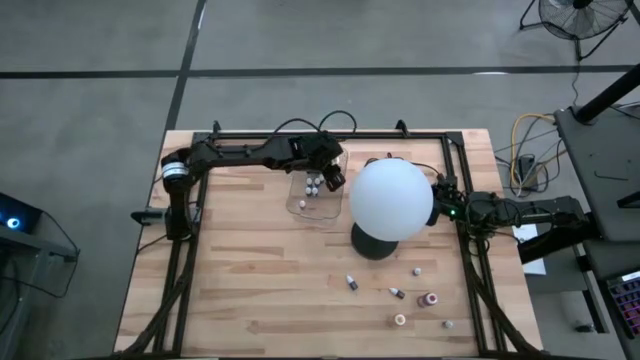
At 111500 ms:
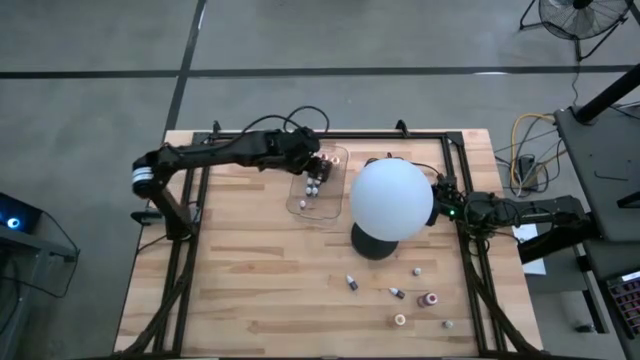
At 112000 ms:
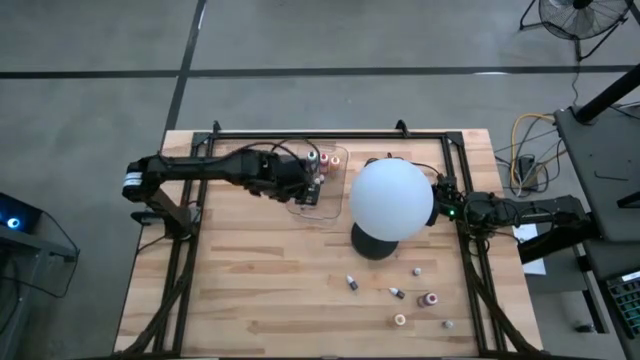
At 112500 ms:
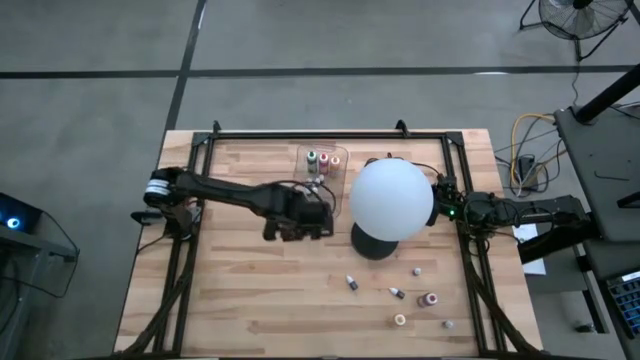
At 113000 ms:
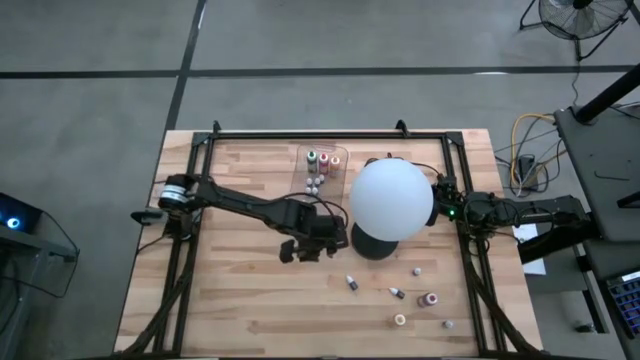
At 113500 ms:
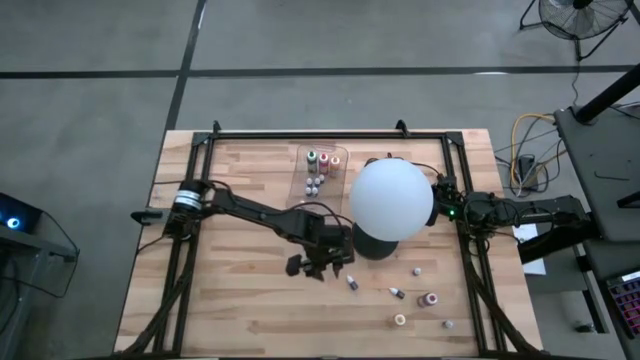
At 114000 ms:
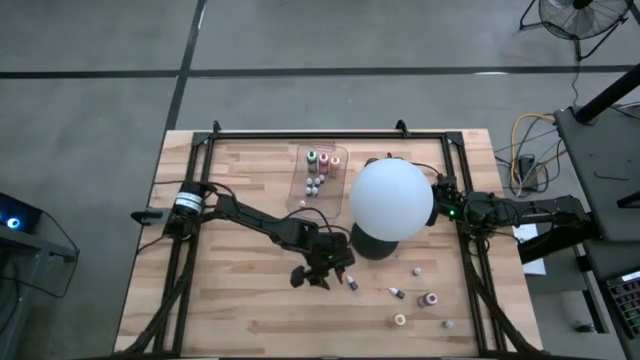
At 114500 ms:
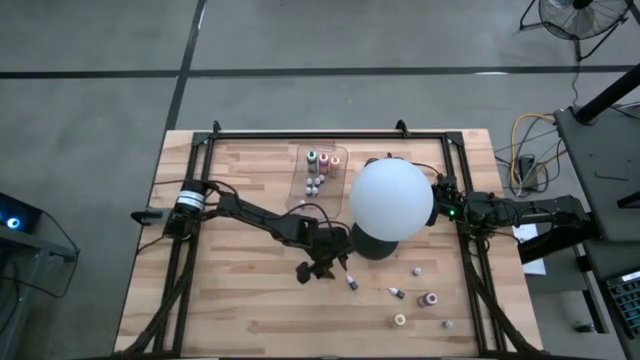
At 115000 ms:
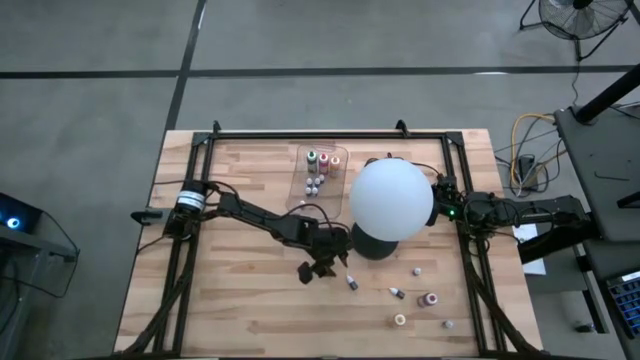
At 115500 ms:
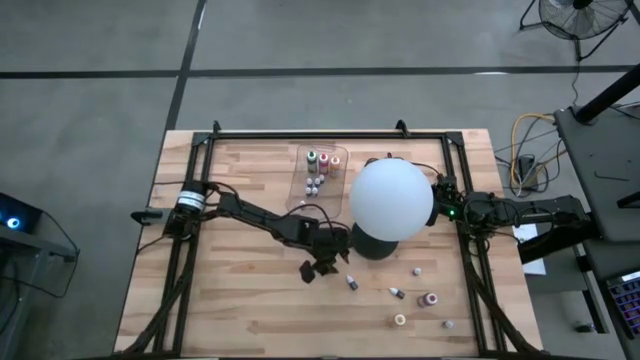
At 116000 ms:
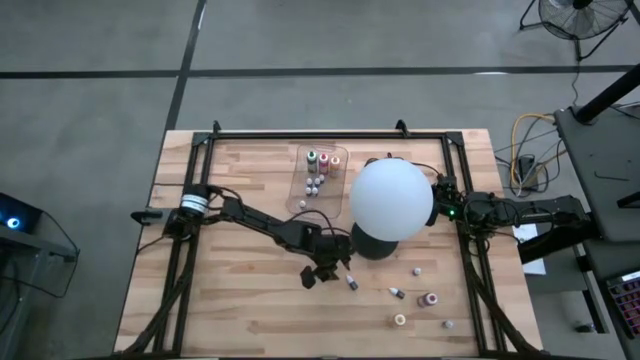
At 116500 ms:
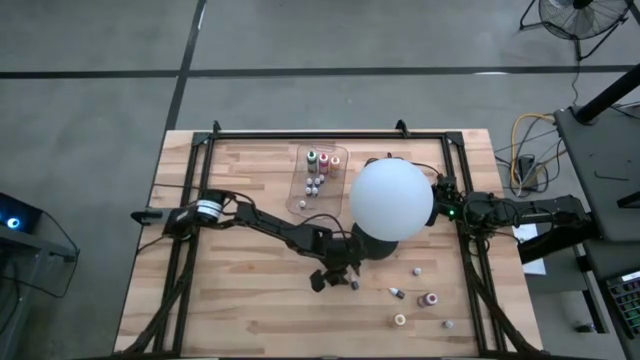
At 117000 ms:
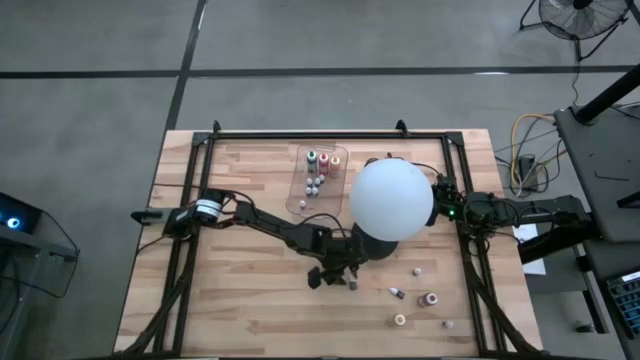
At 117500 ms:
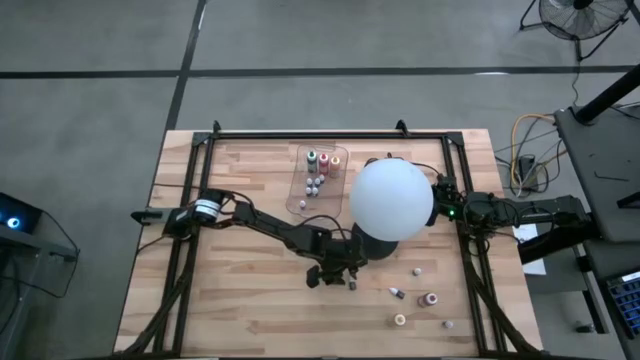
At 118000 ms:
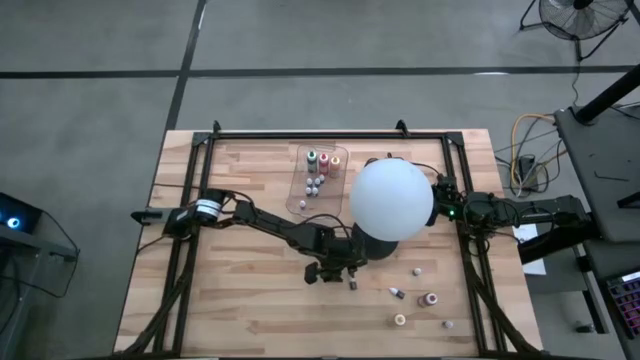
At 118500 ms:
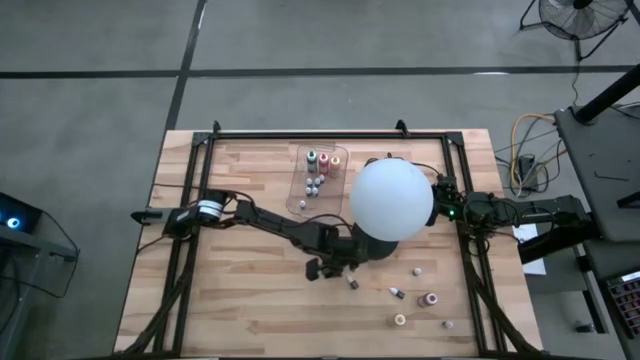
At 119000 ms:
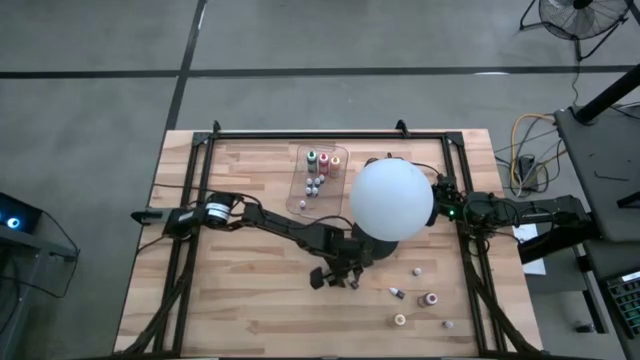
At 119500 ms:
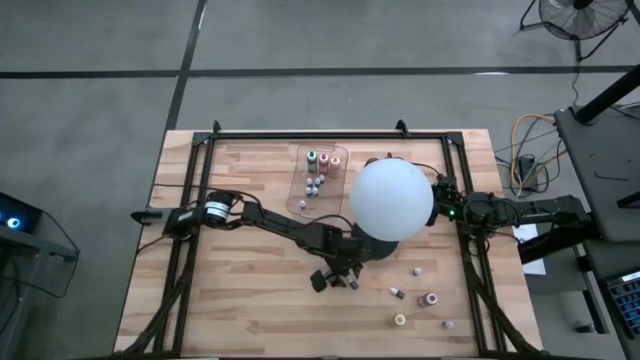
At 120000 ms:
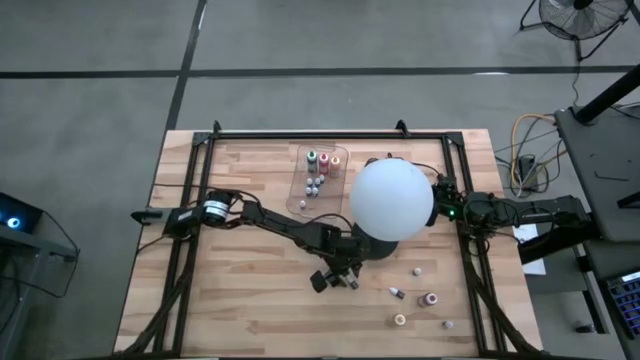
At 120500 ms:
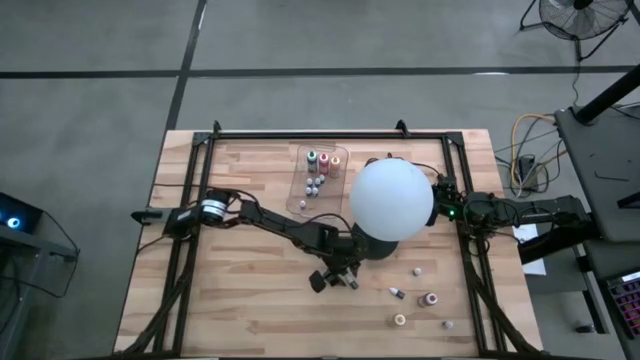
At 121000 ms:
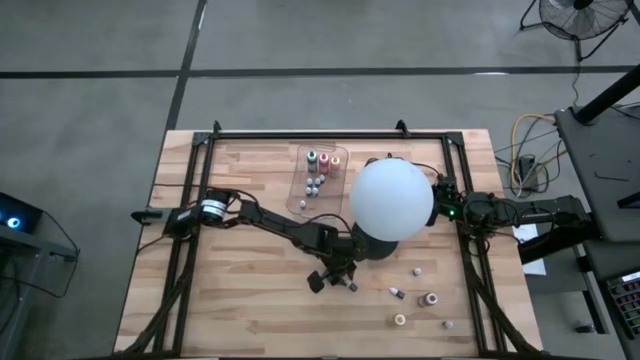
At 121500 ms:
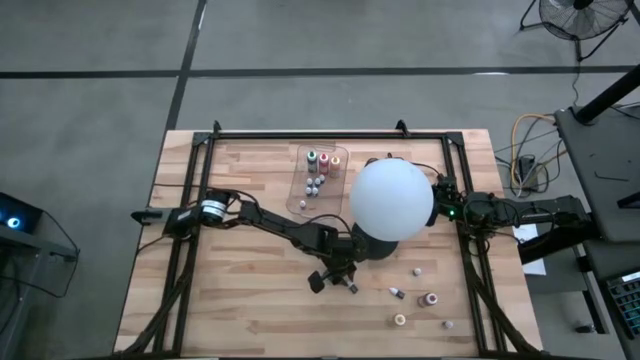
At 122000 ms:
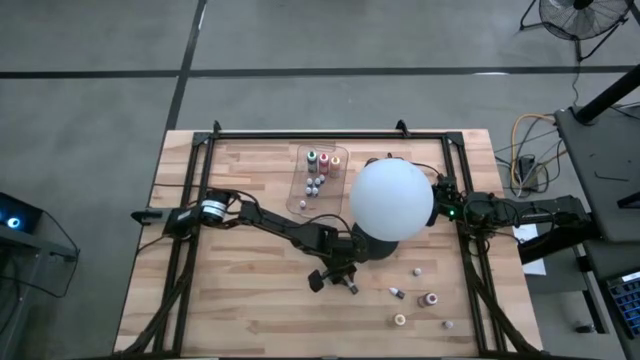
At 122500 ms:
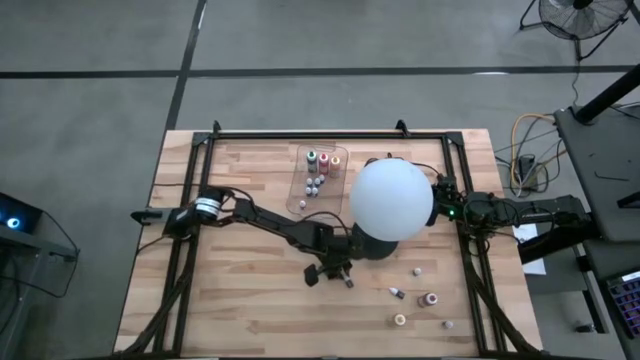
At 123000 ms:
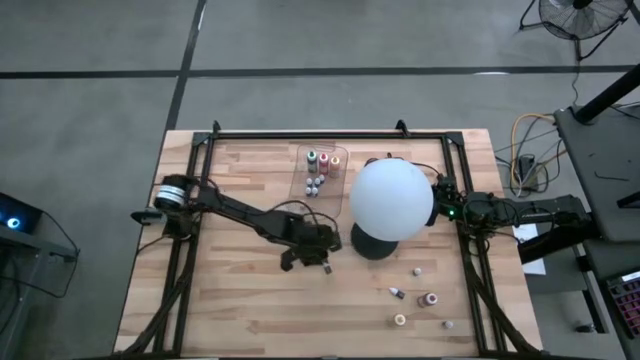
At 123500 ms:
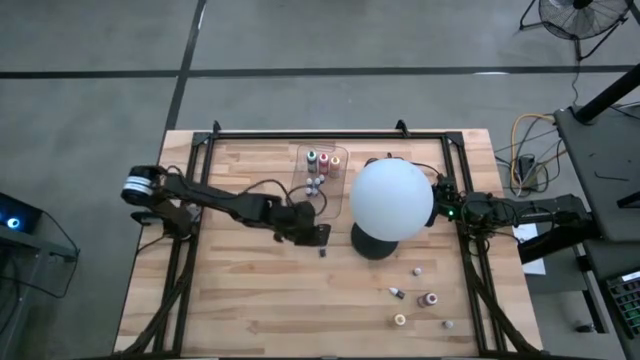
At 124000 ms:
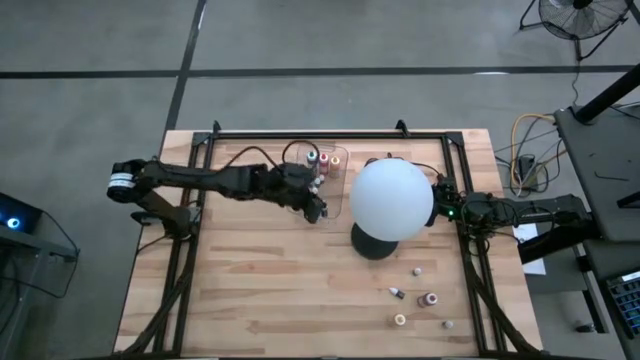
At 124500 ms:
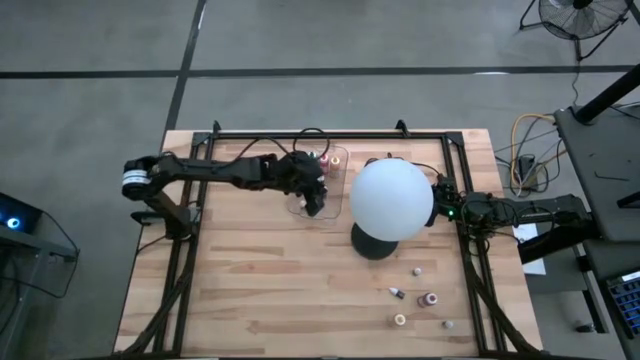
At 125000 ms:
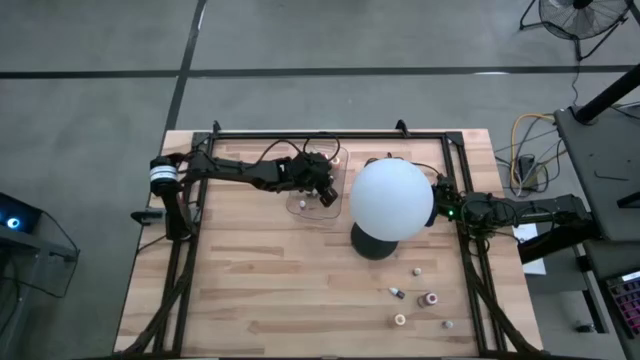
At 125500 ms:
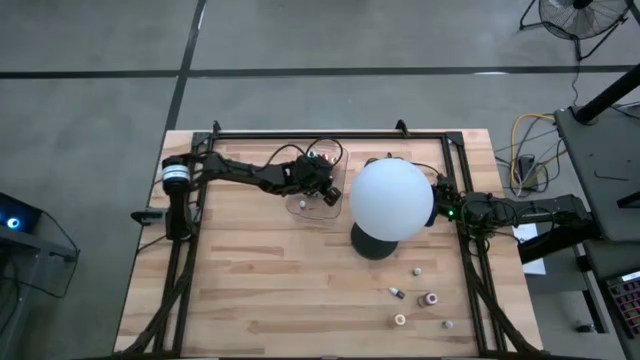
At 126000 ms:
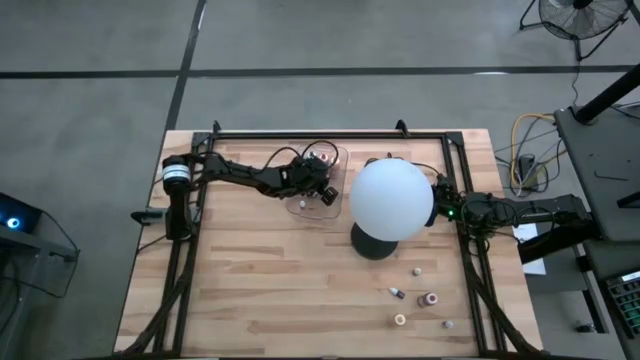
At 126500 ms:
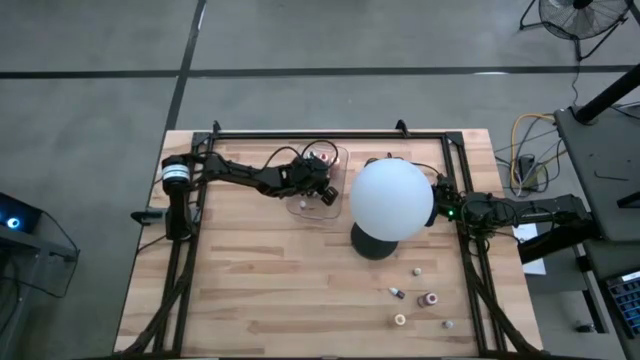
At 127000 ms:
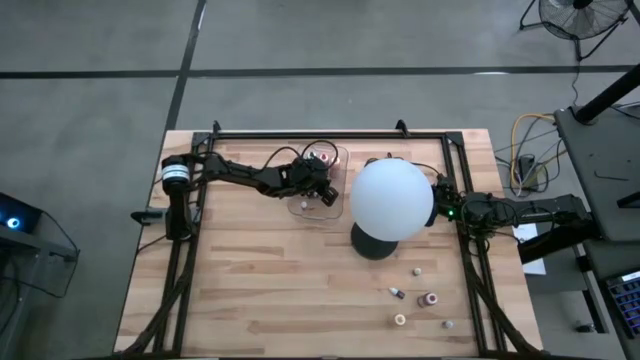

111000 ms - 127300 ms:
Task: Pick & Place food coloring
Put the small black food coloring bottle into the transparent bin

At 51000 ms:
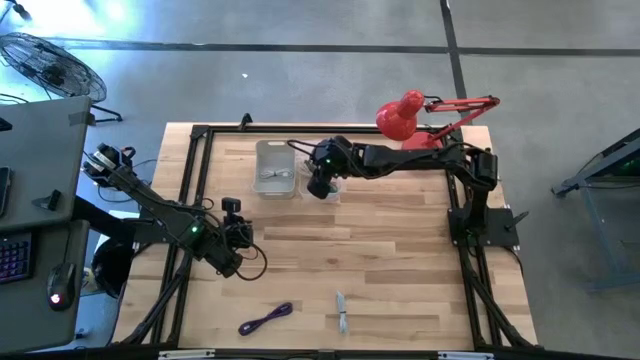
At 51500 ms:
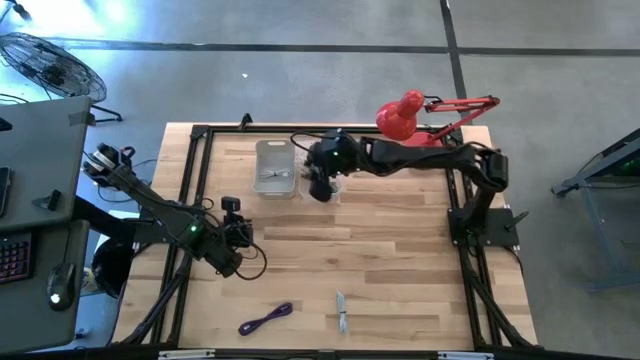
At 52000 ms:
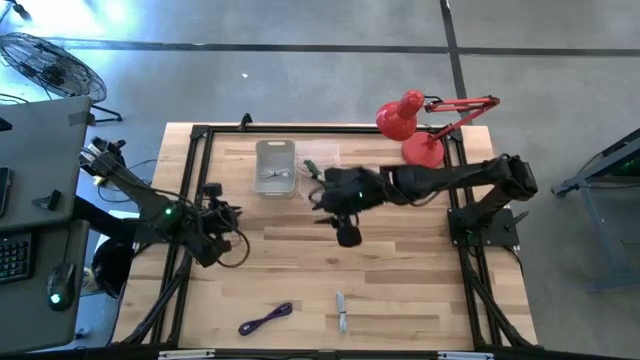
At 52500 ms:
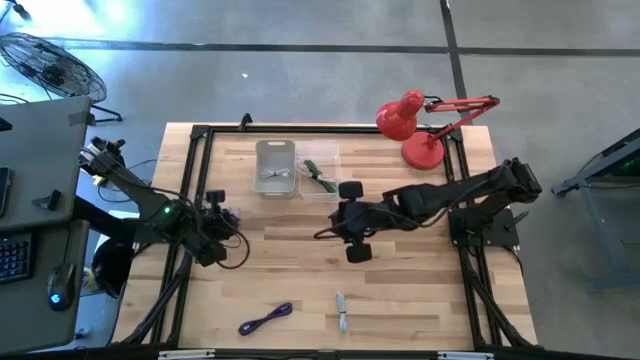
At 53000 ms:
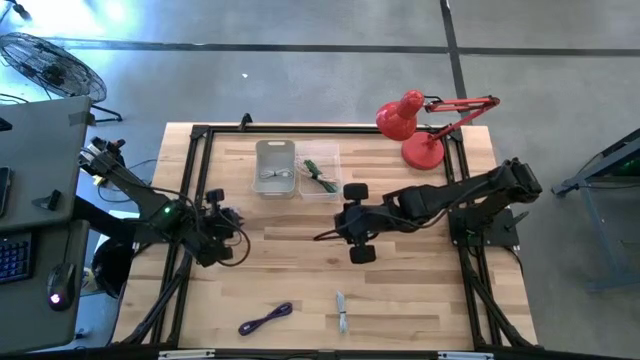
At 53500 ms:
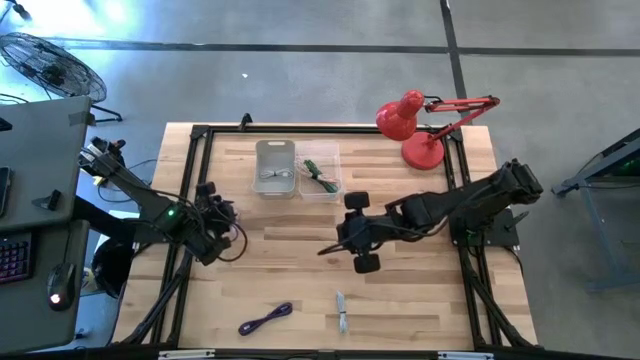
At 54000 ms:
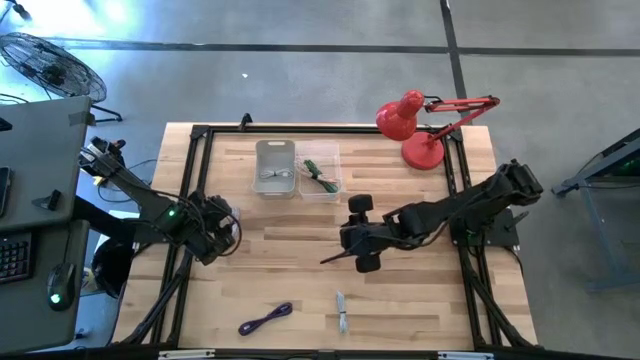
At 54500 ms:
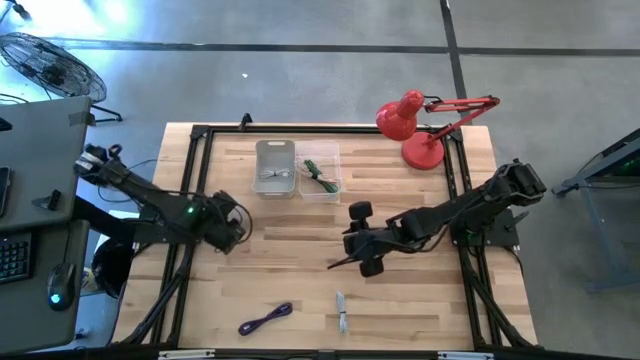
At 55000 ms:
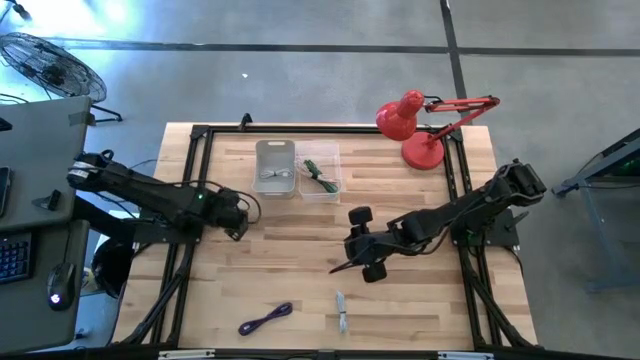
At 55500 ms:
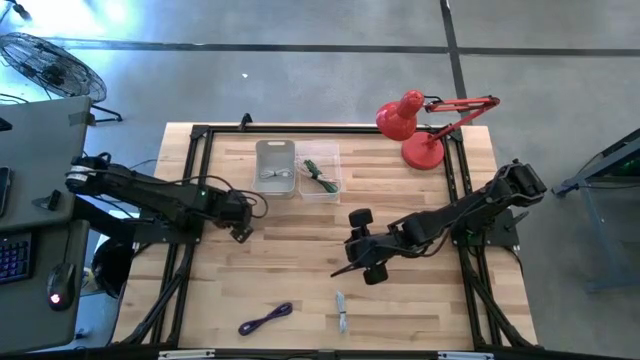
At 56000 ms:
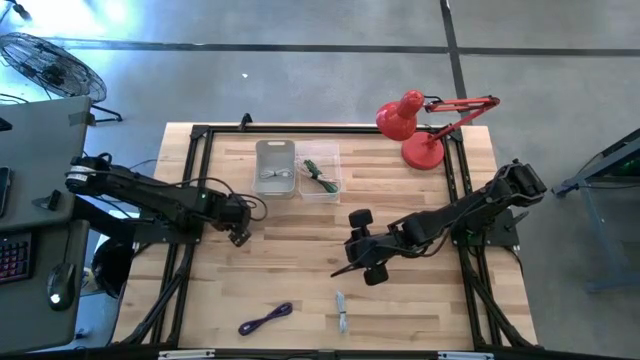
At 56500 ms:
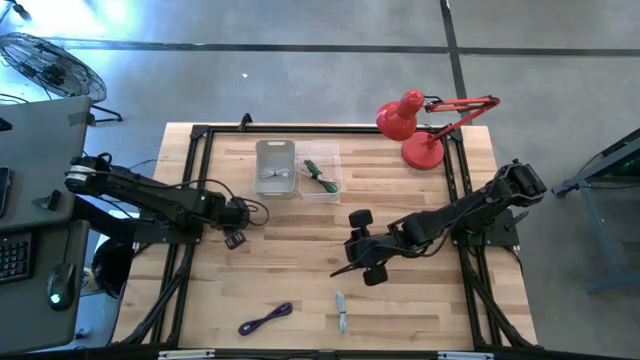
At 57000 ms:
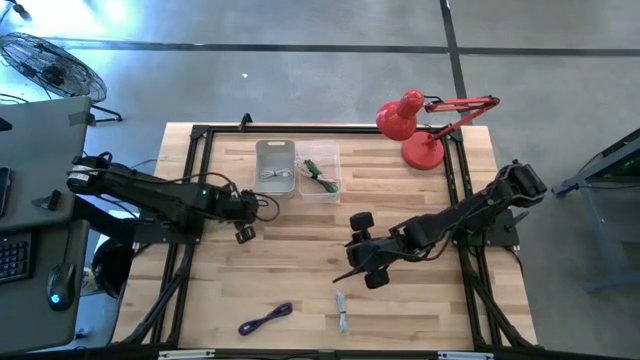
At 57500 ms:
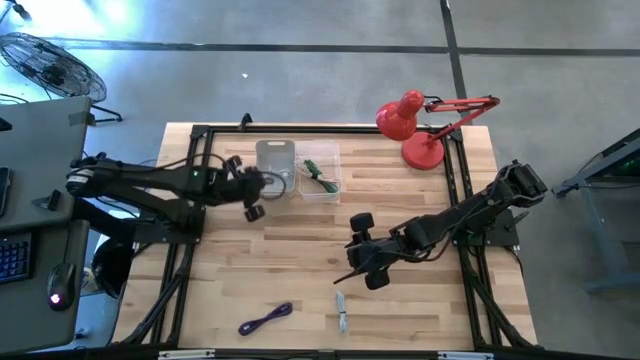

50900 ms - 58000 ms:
Task: Pick & Place USB Port
Put the top white charger cable into the grey bin
